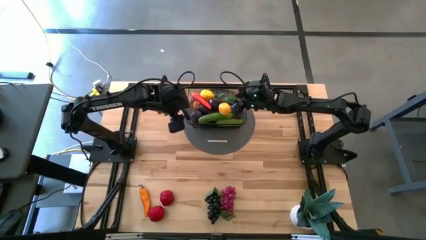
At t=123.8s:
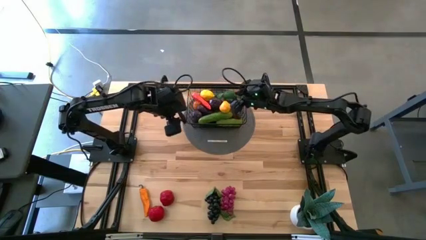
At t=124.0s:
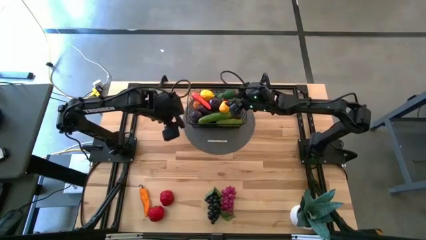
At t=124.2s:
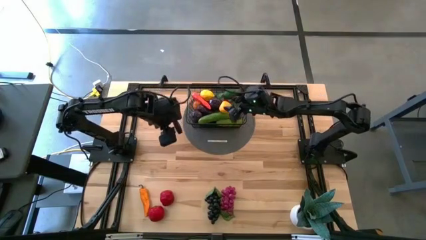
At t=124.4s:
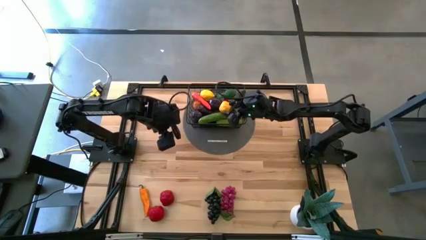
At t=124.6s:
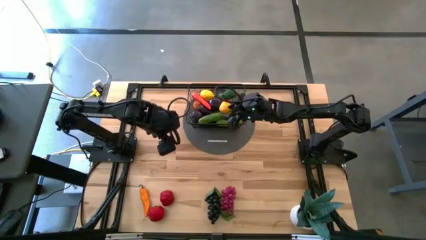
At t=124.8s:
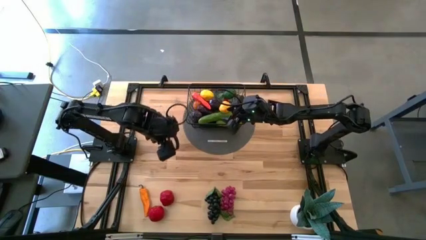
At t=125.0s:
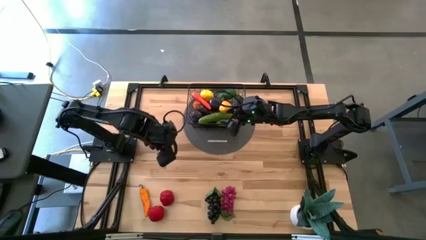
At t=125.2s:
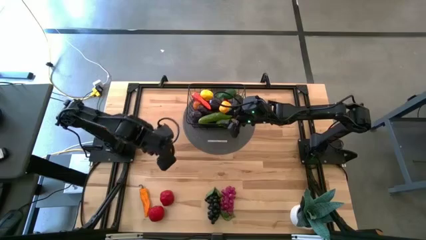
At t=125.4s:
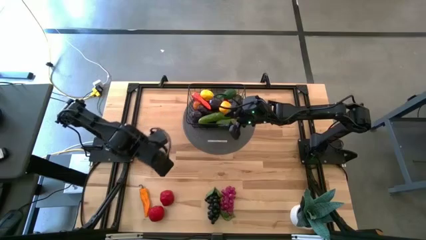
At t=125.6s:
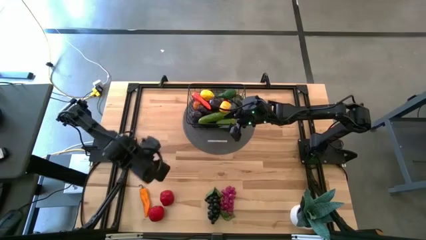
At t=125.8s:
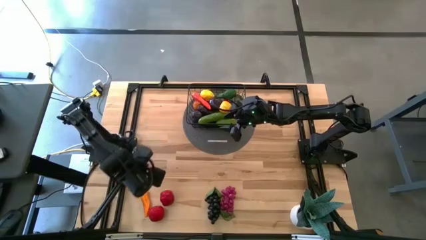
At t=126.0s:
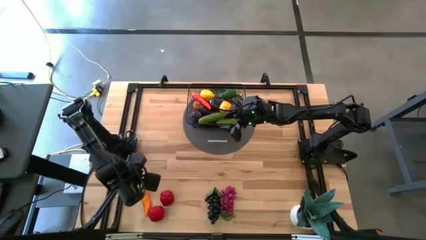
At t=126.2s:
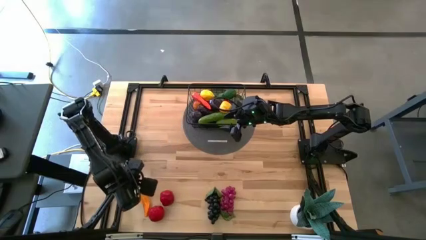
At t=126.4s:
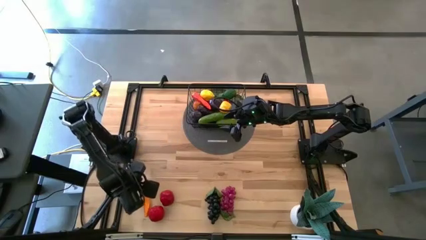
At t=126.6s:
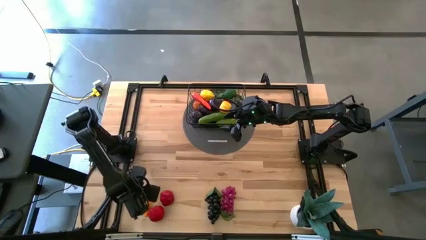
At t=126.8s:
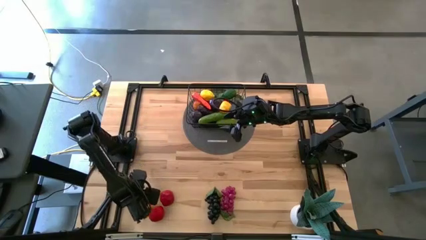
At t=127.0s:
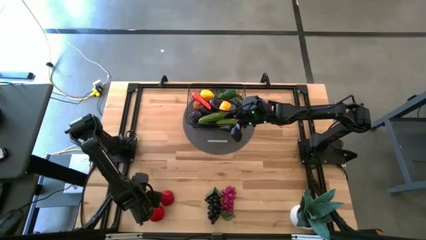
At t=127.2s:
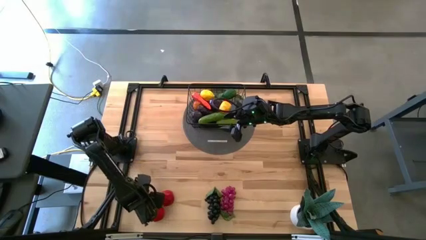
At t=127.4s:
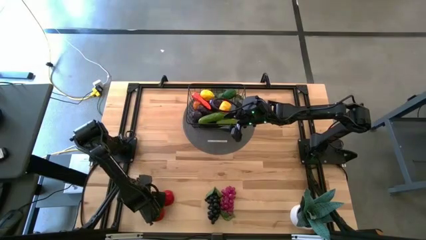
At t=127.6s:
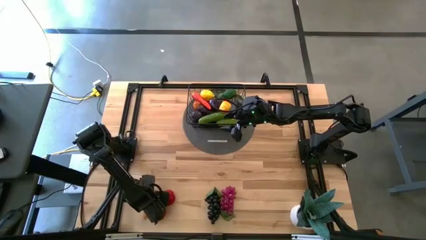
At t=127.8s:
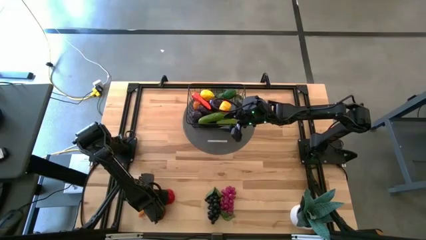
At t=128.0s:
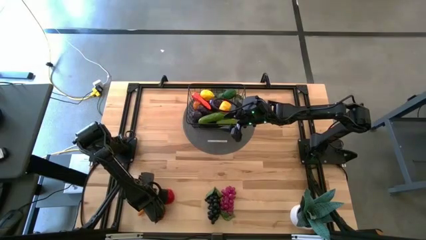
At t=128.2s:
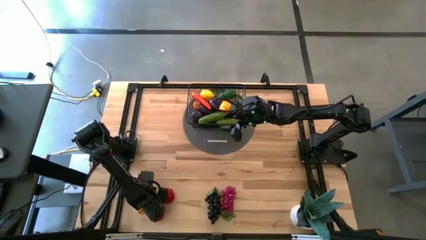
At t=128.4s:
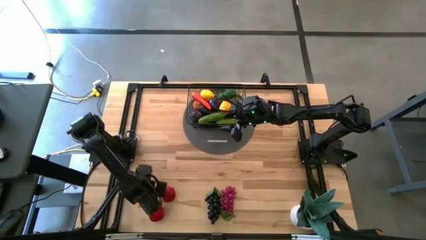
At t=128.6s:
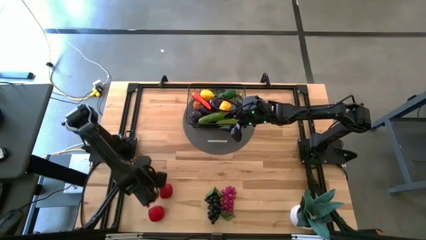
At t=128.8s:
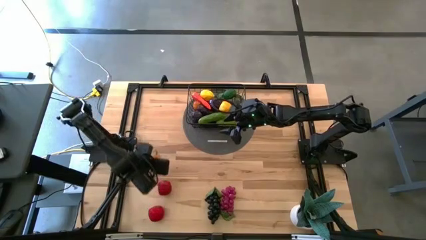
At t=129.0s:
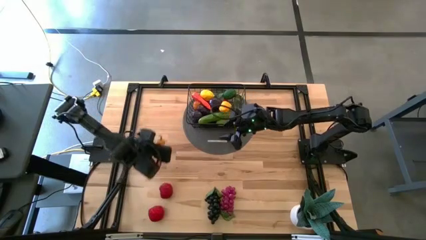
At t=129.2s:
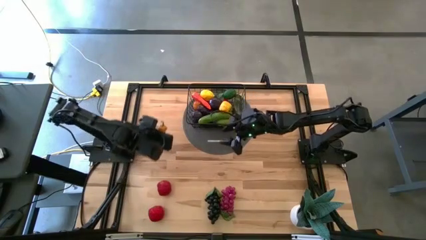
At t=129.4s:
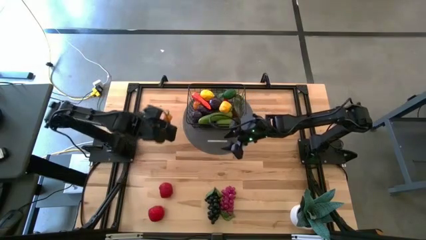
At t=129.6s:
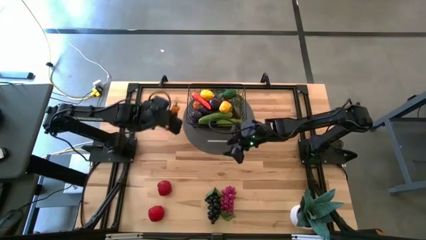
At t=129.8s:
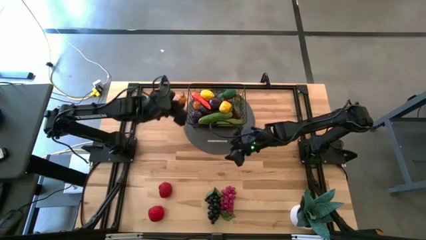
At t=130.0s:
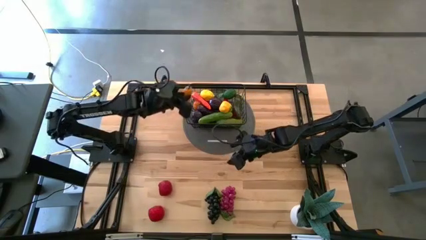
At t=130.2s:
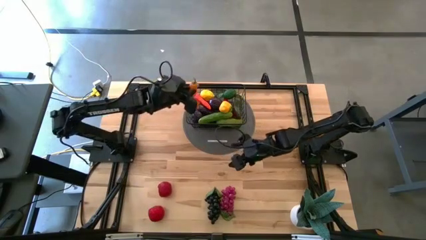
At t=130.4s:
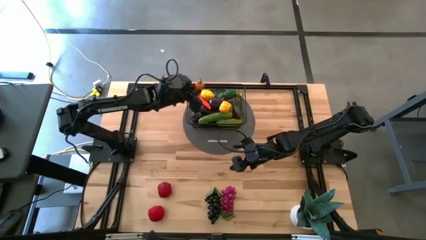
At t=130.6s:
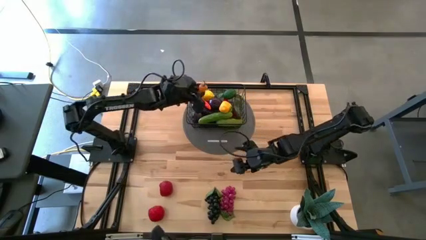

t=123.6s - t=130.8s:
Task: Build produce basket
Put the orange chili pepper into the black wire basket

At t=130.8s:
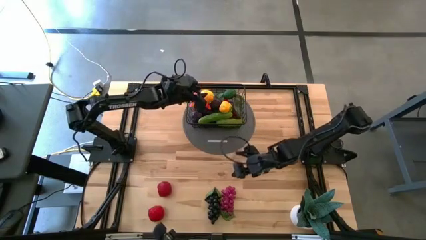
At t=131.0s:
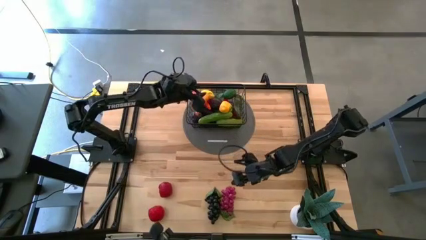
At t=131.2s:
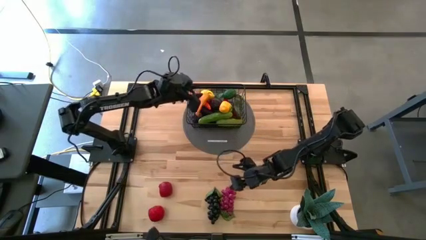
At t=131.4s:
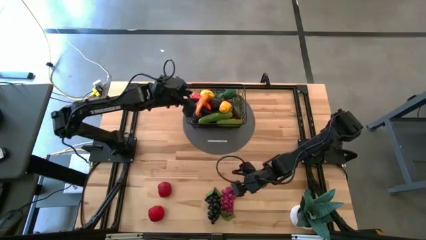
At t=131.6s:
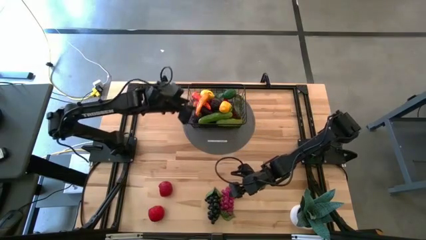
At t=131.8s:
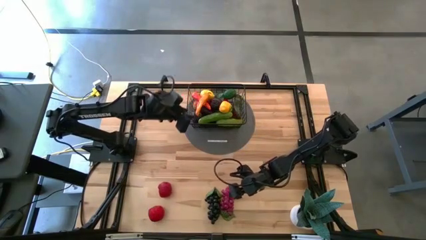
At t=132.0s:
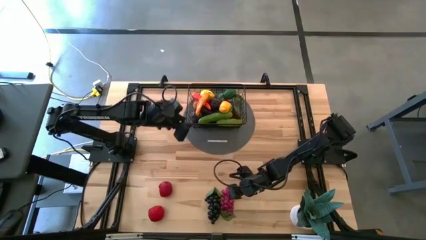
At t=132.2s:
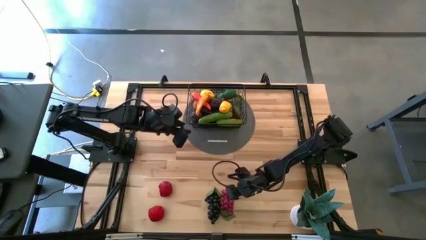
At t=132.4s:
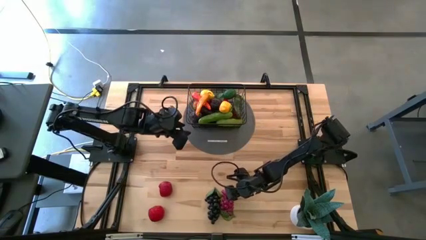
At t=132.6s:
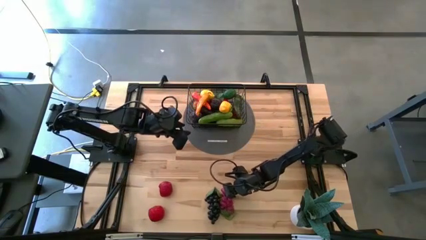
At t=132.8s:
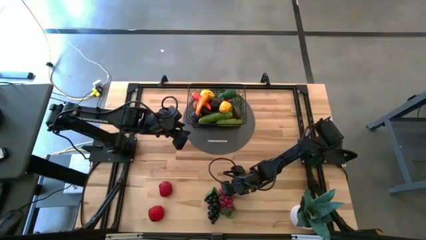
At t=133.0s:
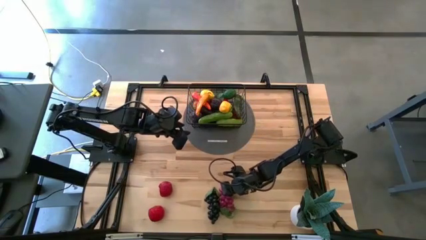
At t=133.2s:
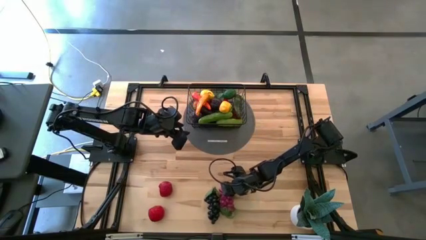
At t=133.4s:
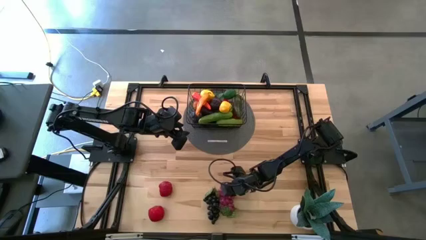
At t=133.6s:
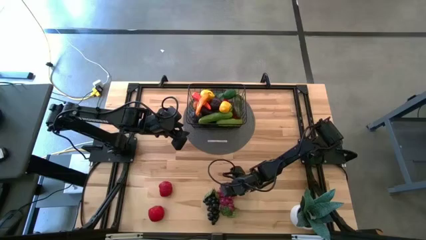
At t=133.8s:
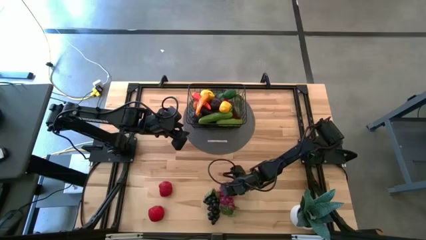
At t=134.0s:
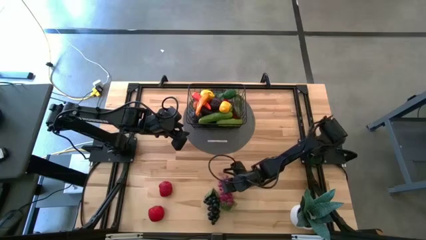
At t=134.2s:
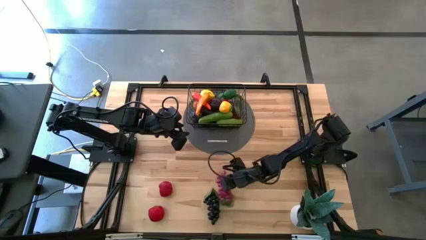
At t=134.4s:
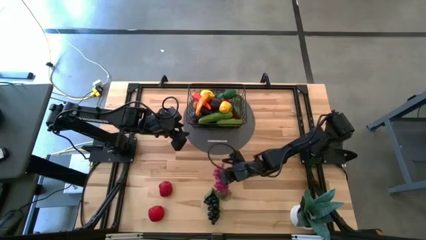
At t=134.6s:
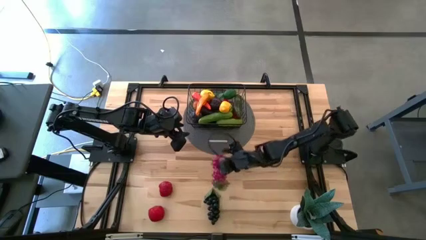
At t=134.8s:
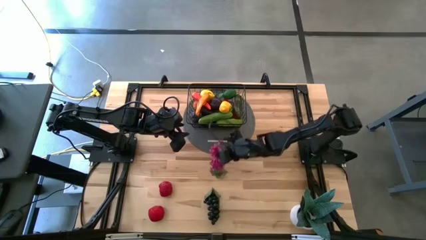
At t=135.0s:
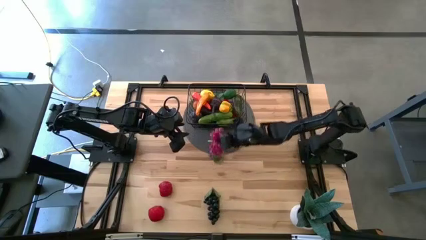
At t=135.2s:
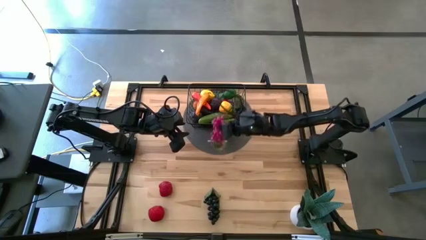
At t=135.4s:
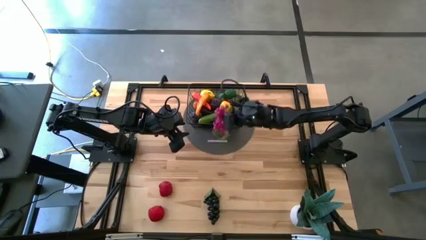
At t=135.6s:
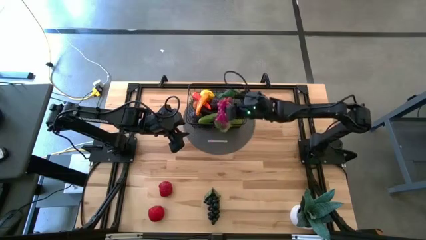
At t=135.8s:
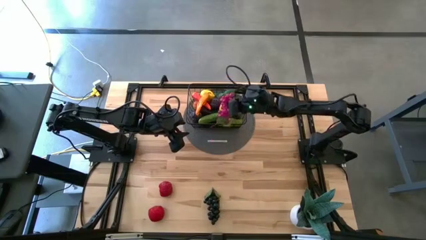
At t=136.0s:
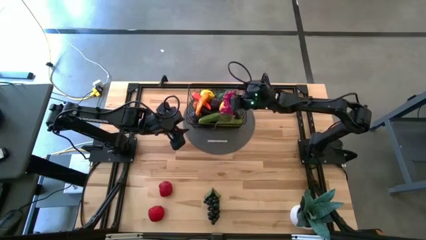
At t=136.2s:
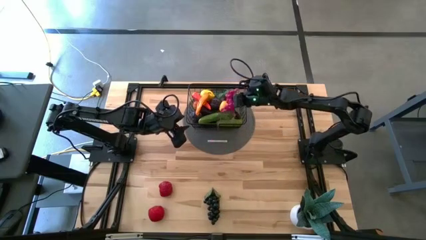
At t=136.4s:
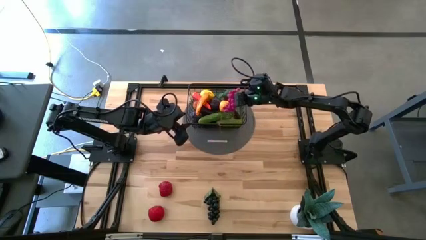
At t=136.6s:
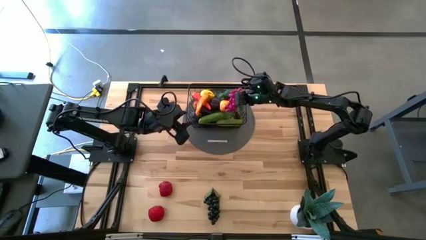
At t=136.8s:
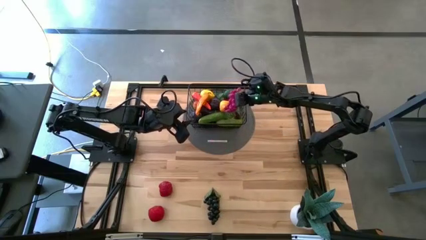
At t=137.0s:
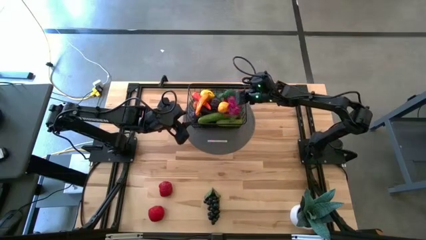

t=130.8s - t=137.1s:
Put the violet grapes into the black wire basket
